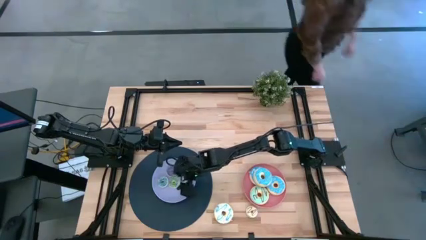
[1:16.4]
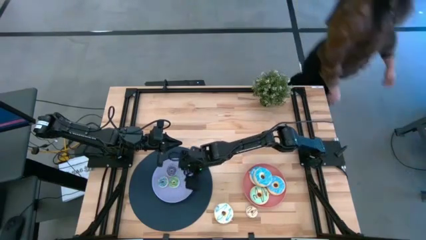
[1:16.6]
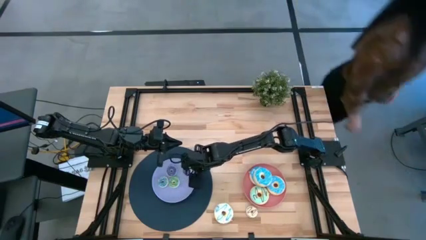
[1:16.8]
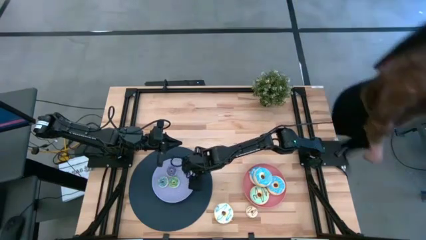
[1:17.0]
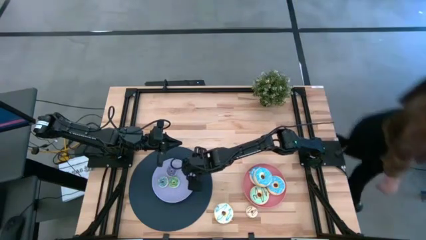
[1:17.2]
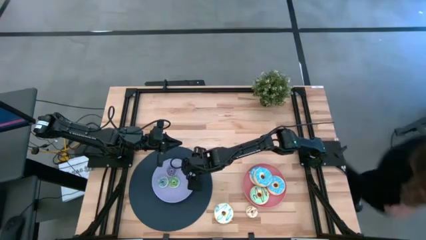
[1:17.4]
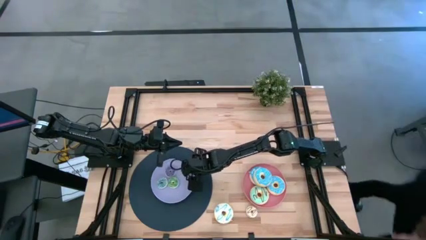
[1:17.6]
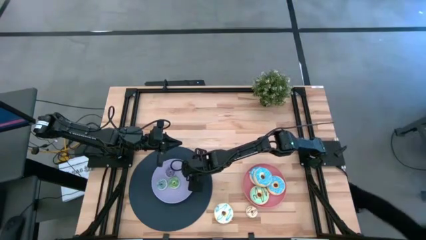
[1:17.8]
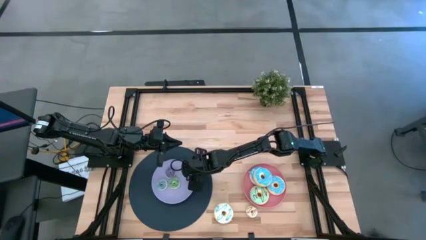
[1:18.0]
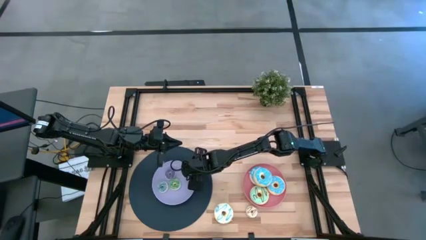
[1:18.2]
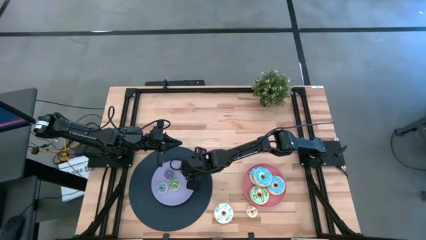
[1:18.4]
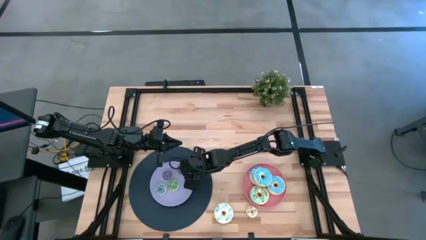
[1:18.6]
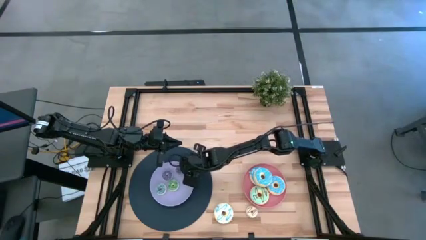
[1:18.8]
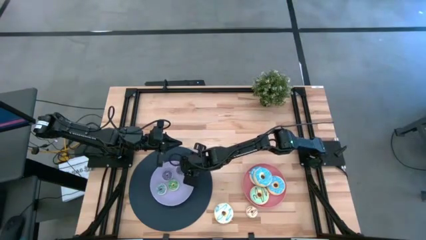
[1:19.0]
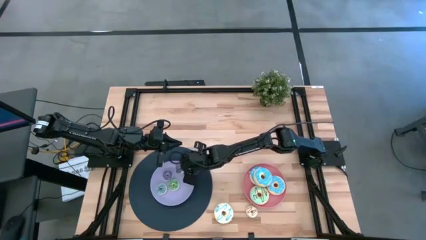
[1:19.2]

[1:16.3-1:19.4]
Task: Pick & Place donuts
Adjust the small dark blue donut on the purple plate

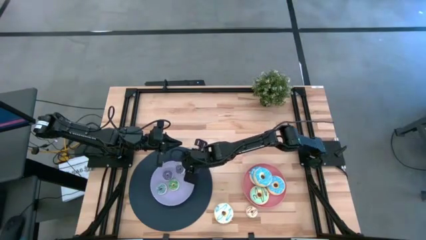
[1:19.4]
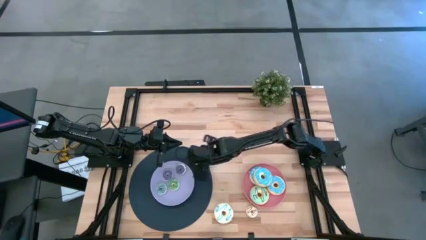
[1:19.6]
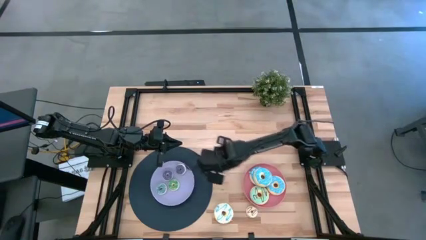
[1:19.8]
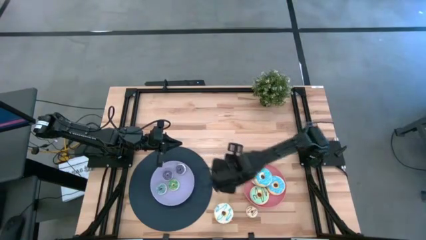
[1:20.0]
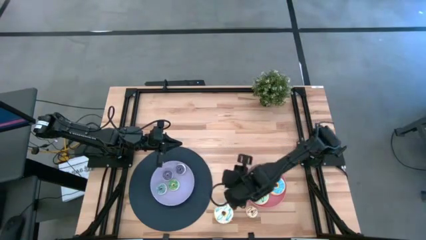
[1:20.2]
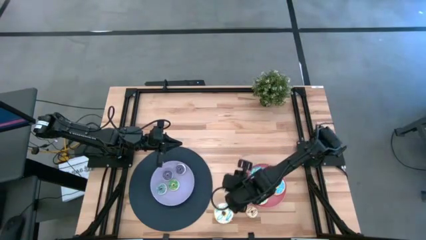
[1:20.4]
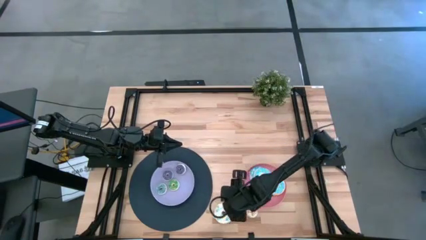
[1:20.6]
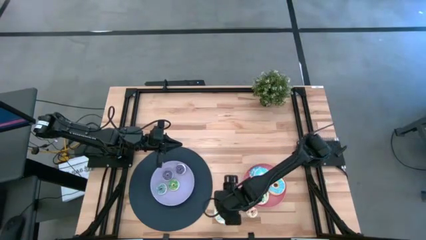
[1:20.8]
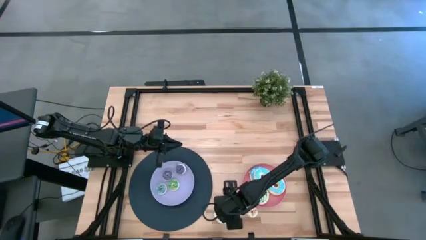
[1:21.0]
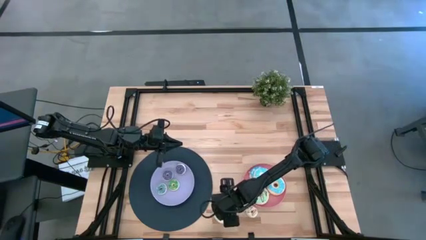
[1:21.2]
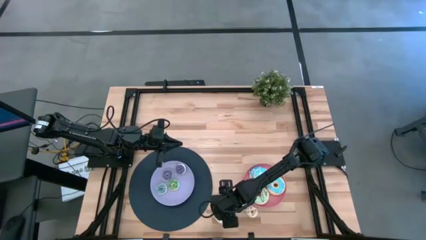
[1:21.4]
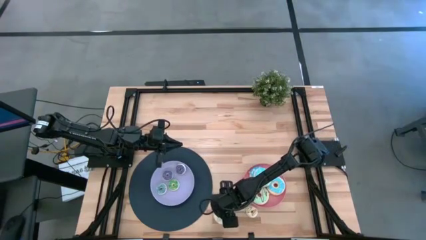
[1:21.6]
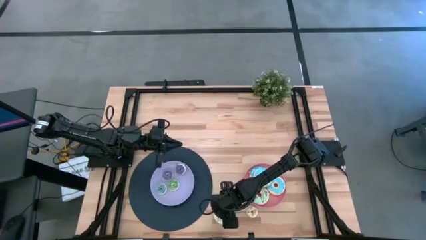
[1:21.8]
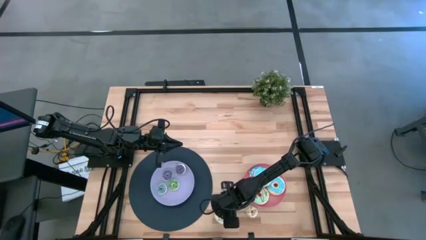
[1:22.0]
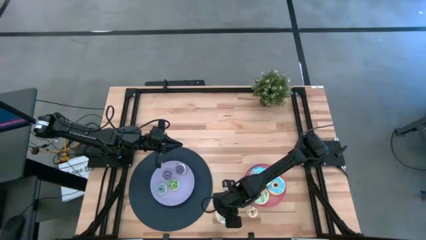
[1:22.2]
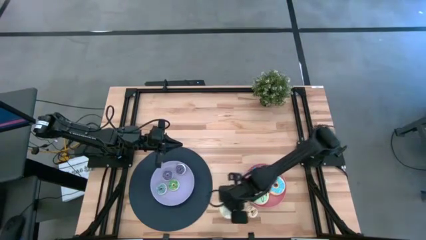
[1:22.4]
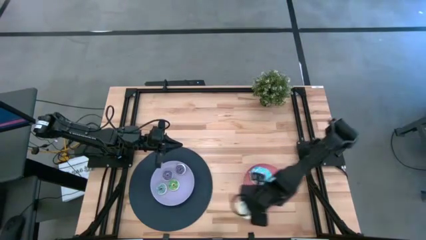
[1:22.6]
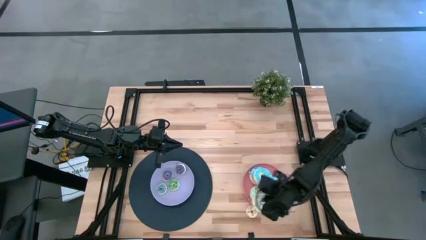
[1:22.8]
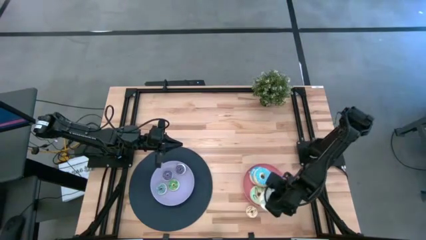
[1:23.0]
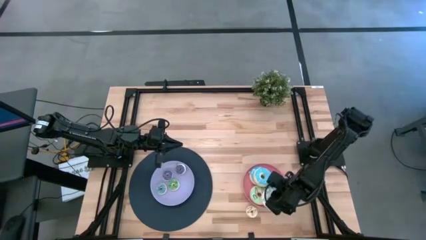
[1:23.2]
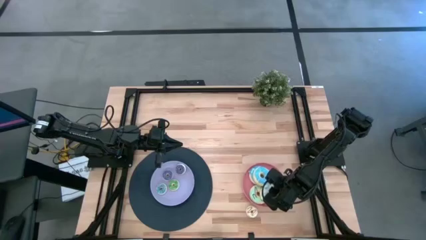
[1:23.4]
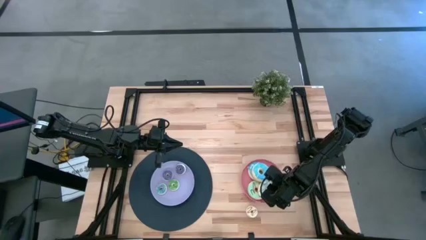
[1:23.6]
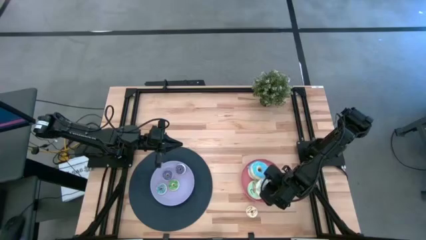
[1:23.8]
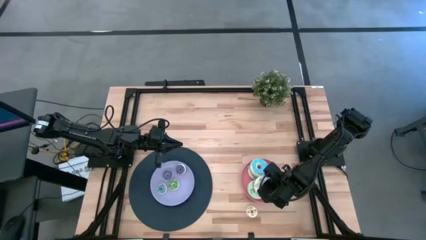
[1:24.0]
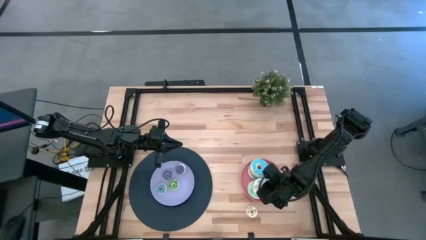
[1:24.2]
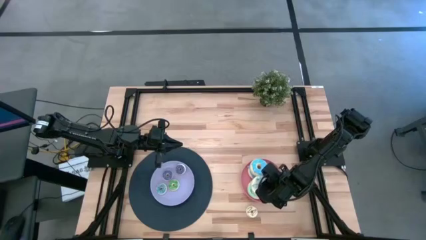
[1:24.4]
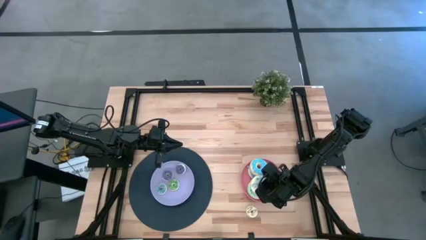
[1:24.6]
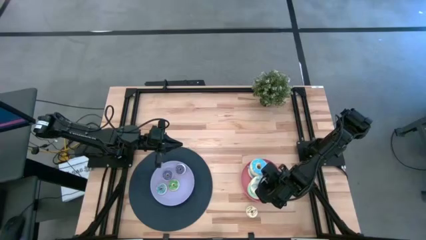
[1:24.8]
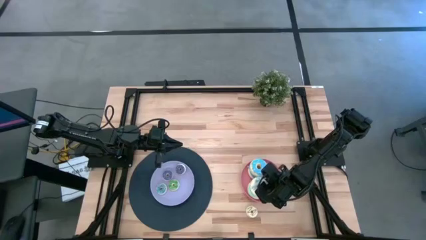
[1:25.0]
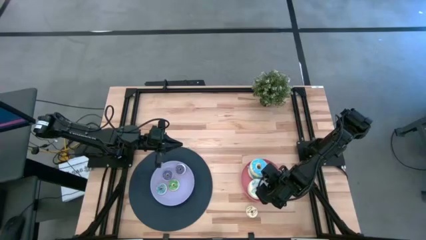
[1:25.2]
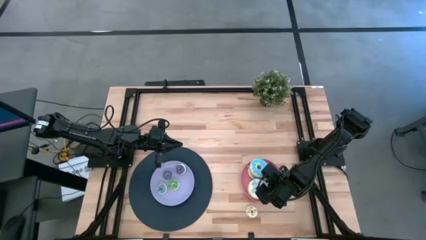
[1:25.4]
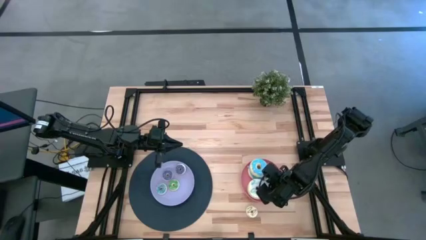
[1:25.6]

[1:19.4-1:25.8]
Put the large white donut on the pink plate

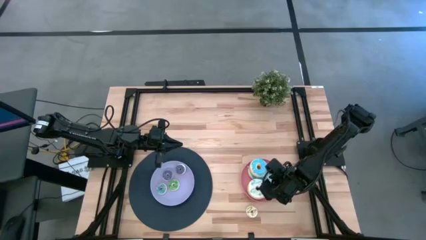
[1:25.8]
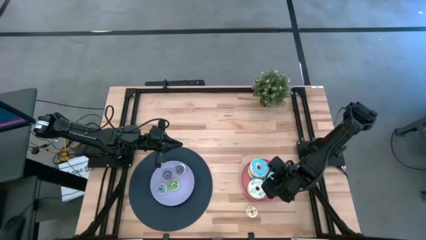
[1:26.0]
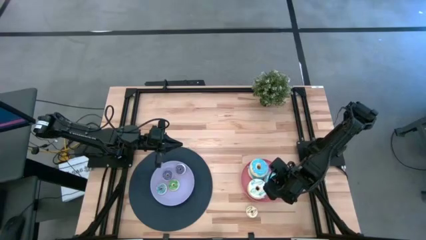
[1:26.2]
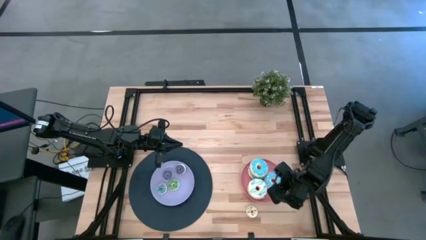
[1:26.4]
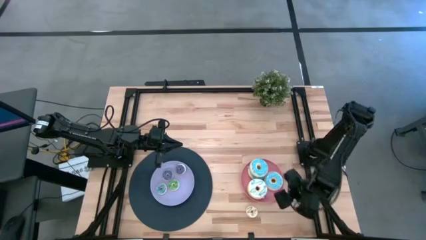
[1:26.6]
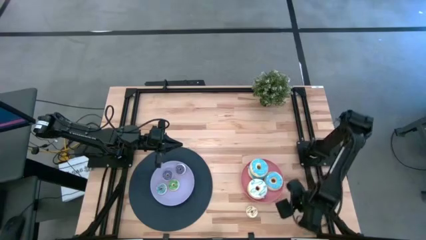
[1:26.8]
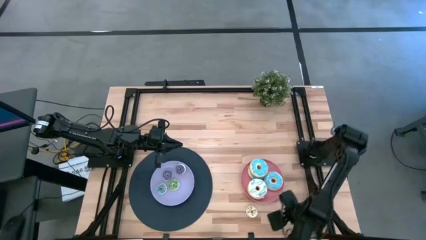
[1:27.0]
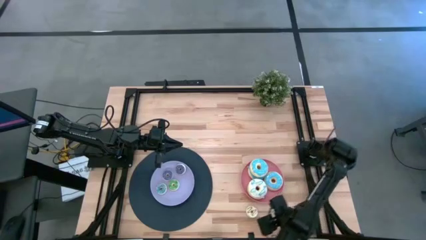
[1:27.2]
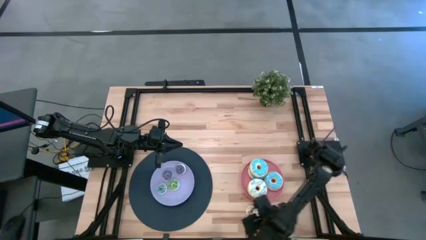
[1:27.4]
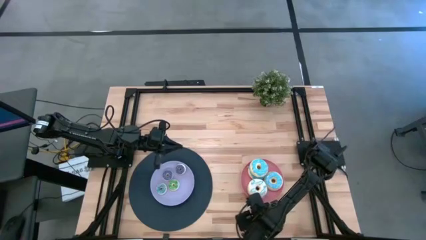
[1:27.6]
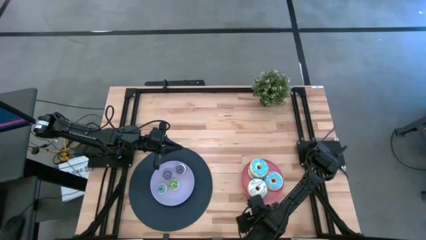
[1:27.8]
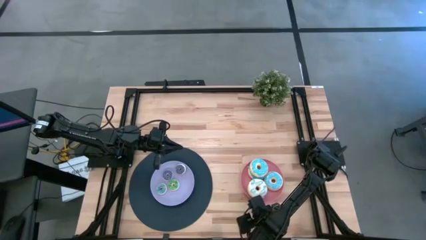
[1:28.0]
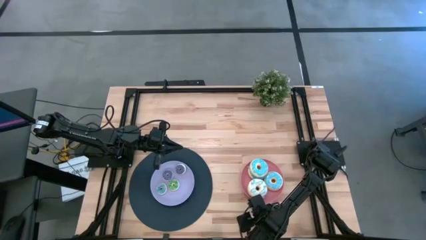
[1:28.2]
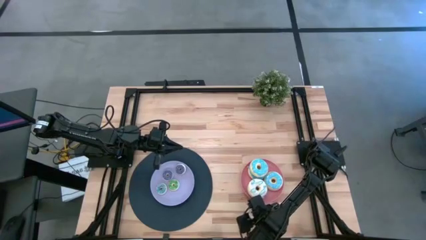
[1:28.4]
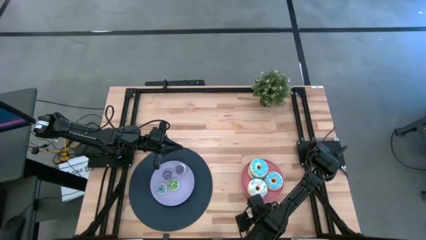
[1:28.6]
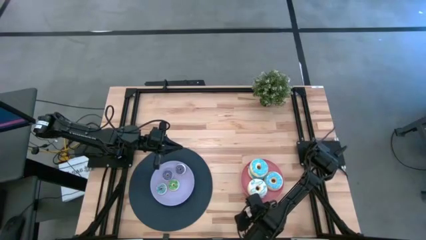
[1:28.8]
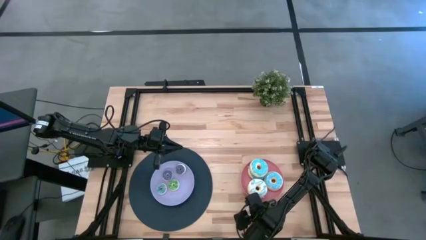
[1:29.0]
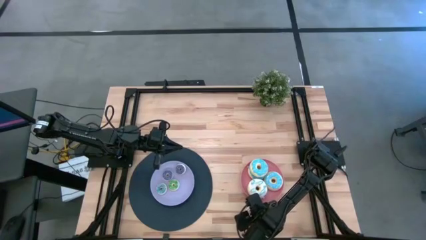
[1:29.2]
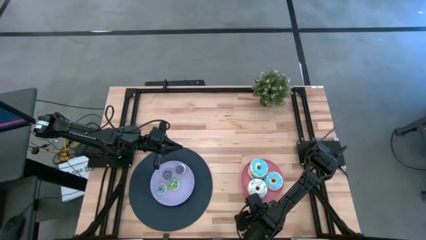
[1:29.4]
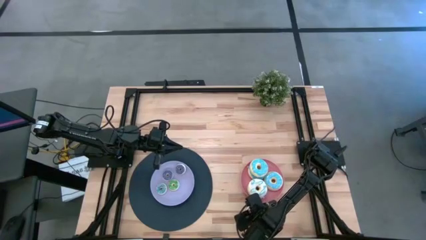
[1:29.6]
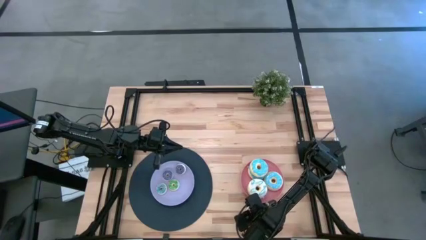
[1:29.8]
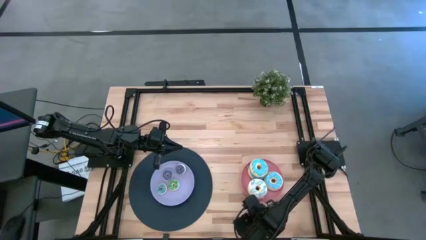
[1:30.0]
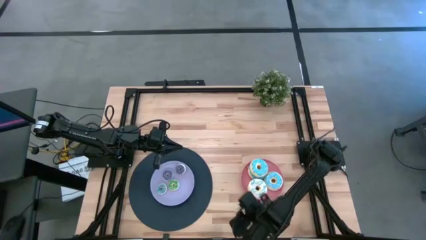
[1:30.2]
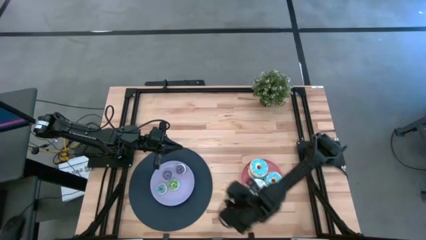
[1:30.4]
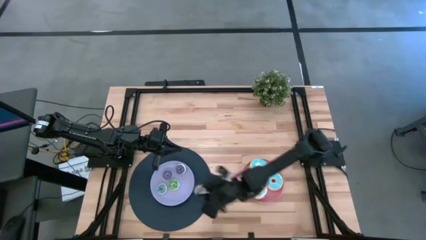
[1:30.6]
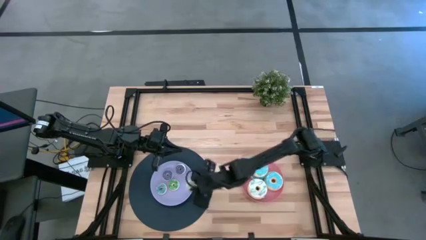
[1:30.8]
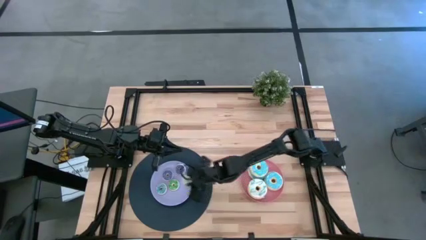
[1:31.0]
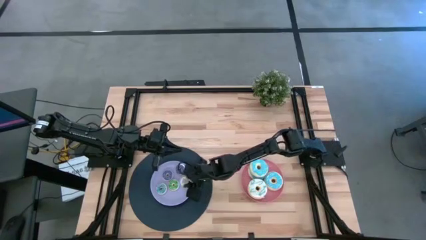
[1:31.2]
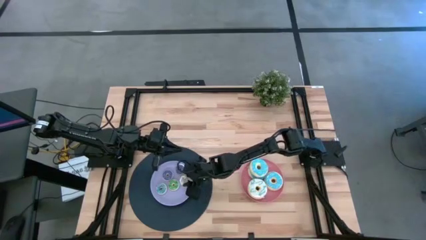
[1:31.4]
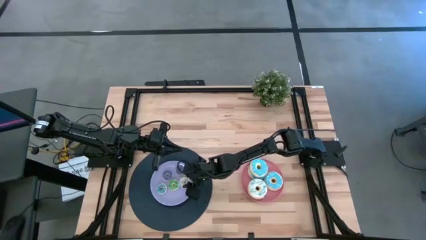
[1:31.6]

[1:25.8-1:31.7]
Put the small white donut on the purple plate

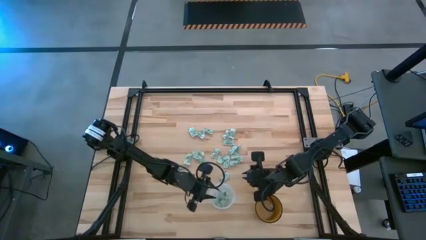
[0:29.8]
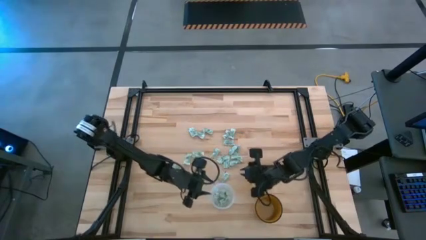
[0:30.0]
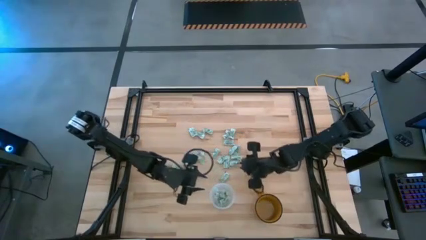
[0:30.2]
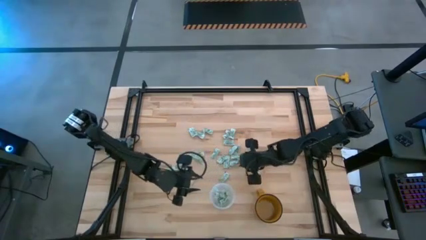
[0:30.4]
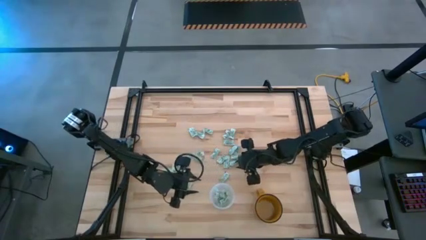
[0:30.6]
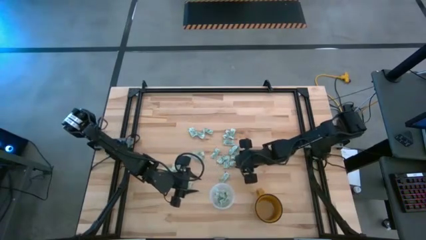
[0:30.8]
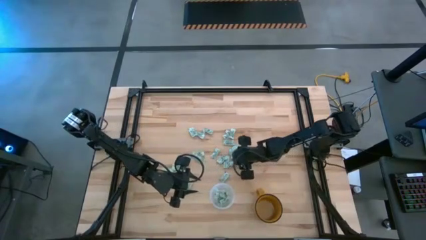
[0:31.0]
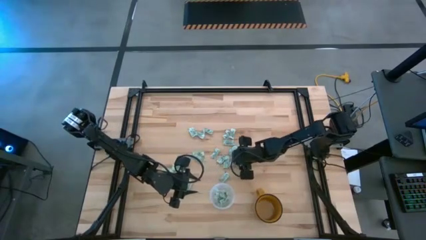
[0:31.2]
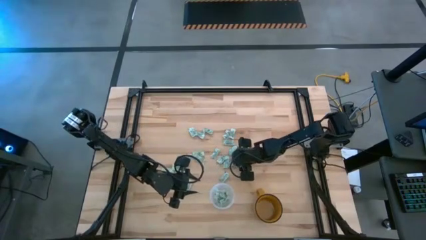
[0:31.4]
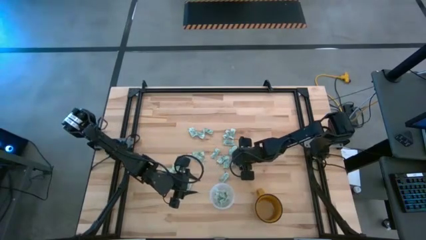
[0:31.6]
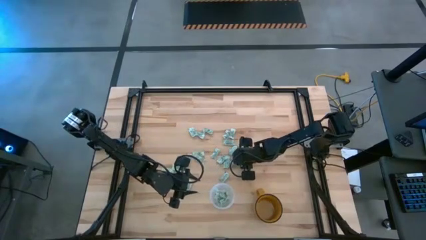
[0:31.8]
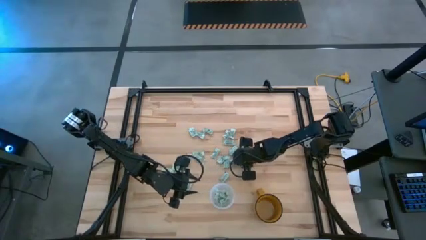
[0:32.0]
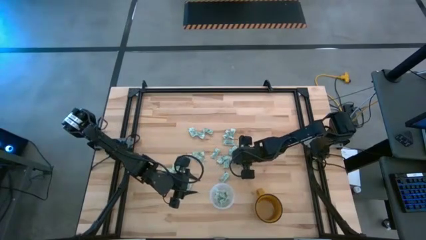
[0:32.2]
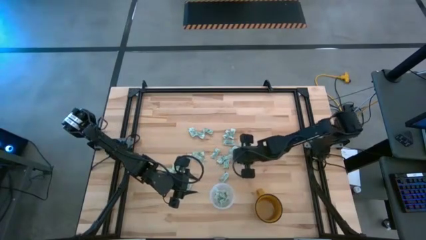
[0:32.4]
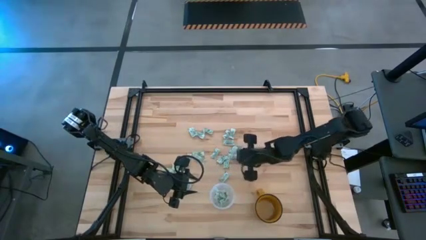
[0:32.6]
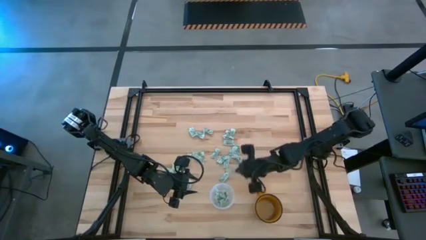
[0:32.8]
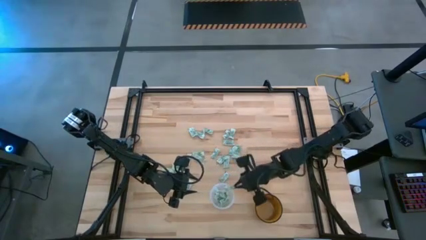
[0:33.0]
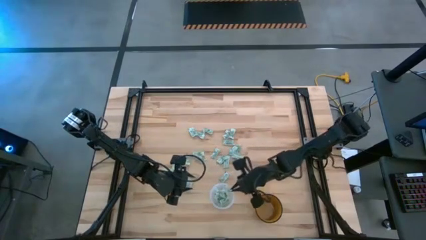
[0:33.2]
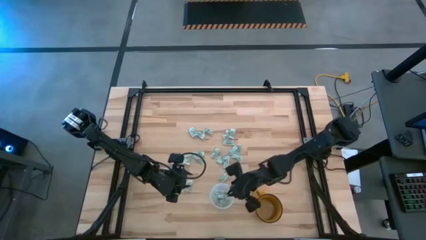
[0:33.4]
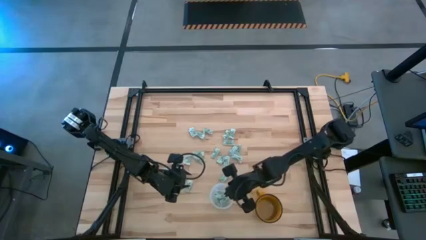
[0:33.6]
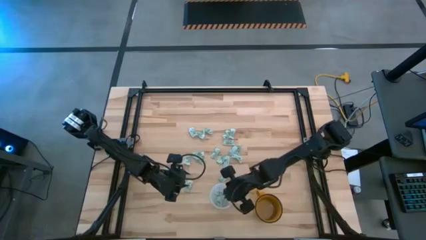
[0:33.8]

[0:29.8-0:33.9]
Task: Pick and place Stevia / Truvia into bins
Put the stevia packet into the transparent bin
